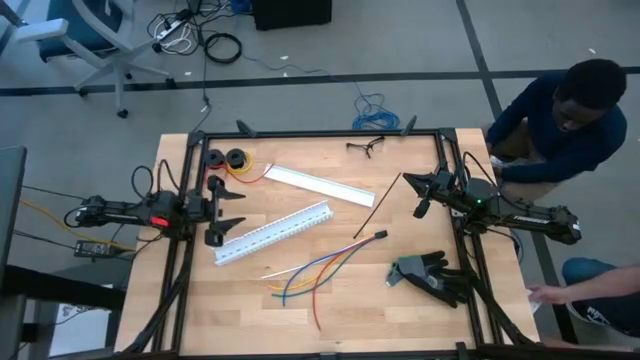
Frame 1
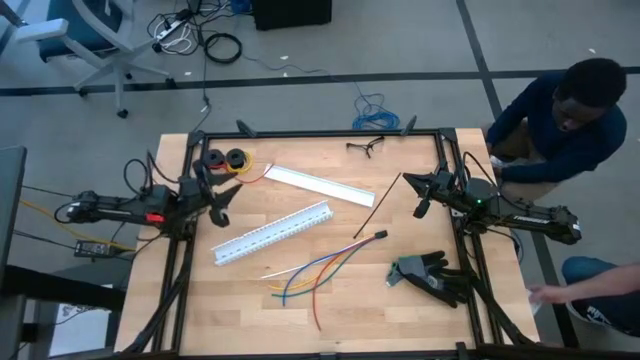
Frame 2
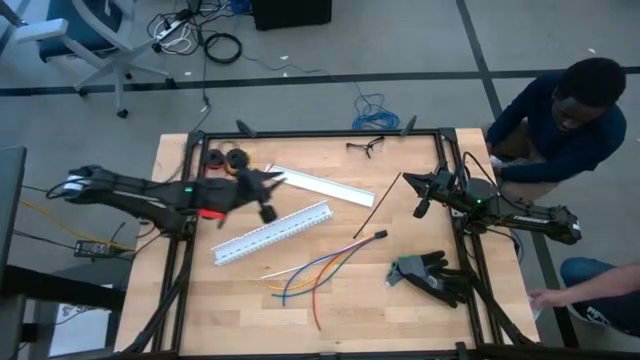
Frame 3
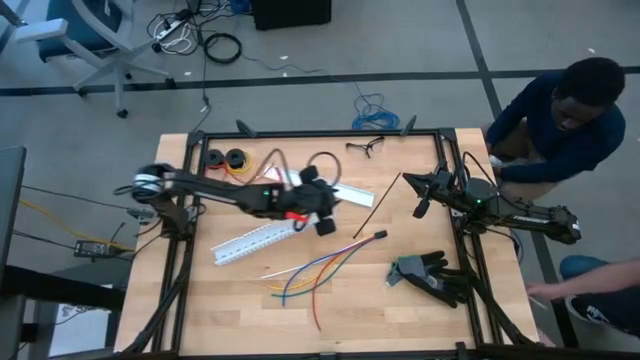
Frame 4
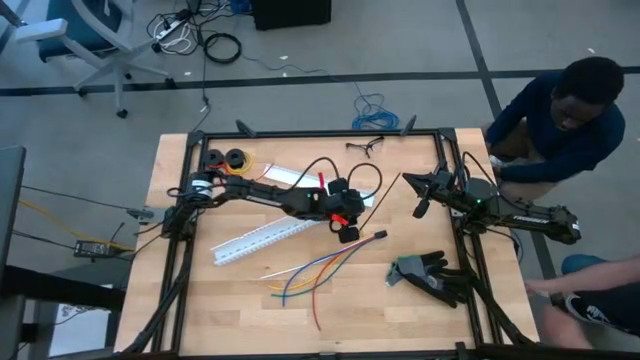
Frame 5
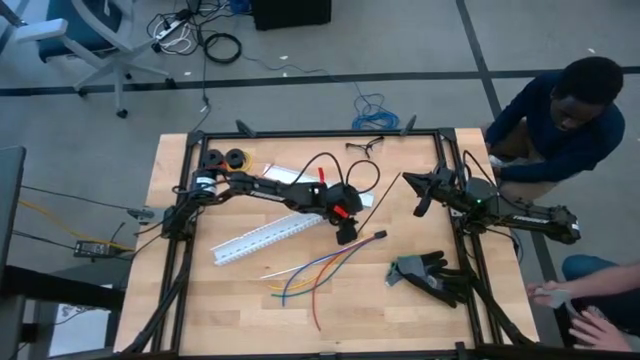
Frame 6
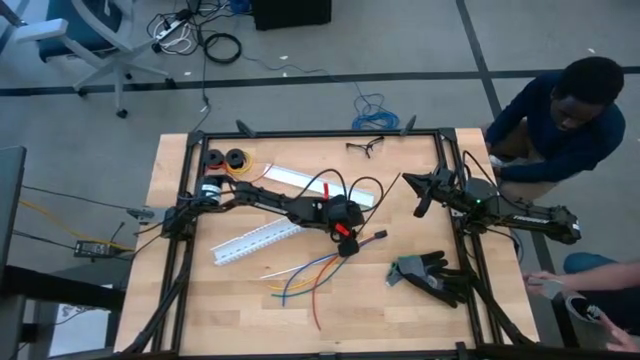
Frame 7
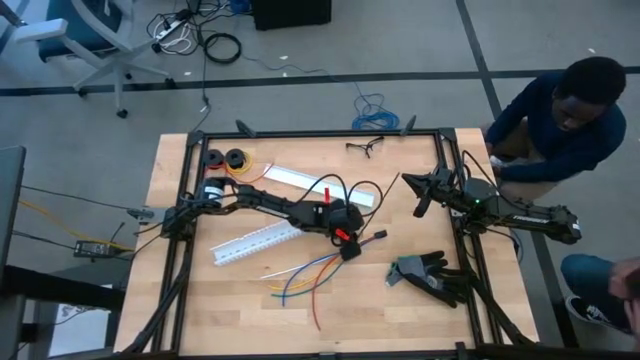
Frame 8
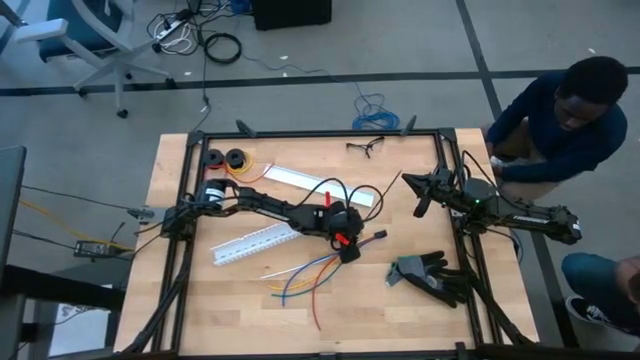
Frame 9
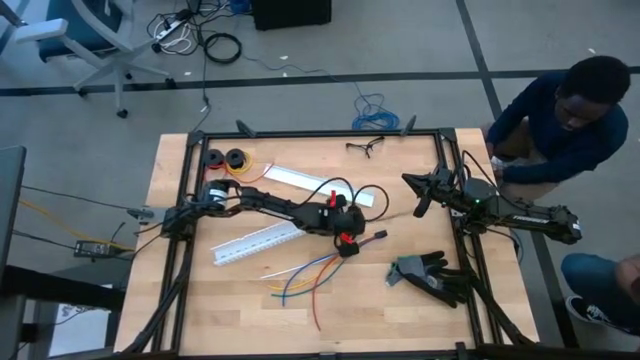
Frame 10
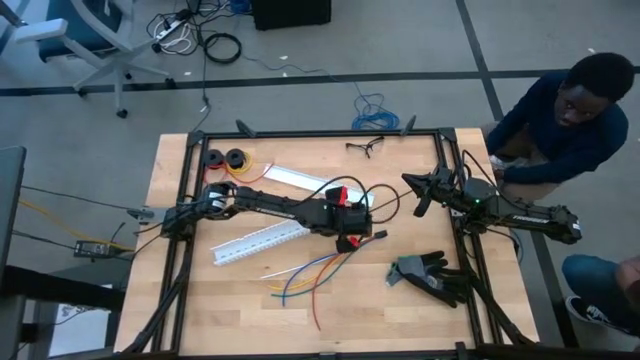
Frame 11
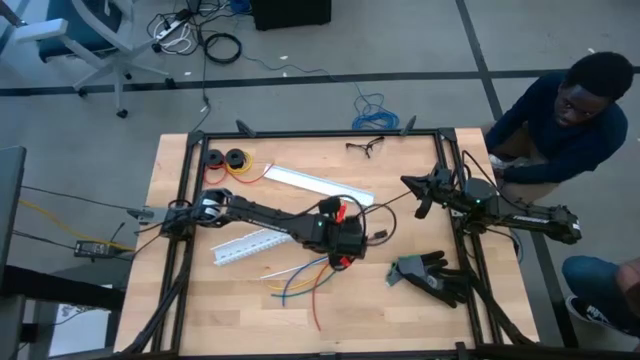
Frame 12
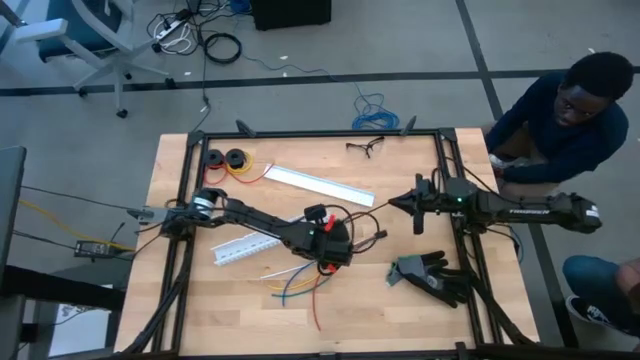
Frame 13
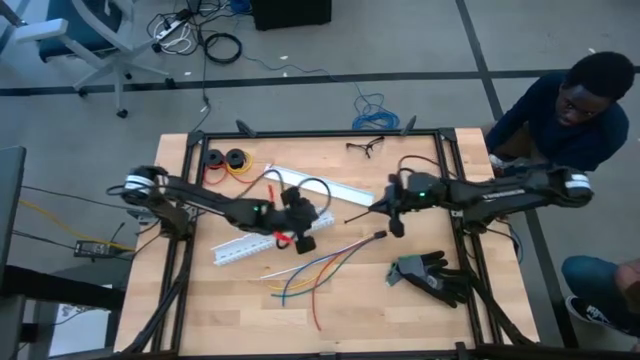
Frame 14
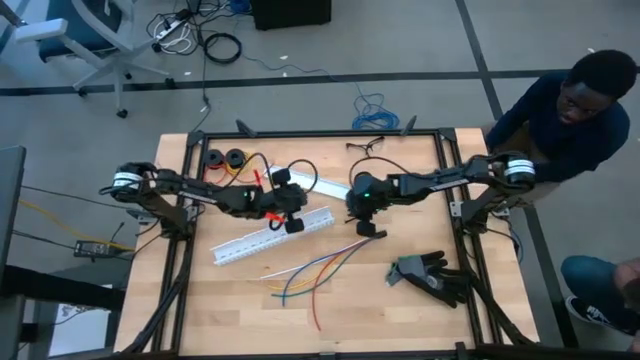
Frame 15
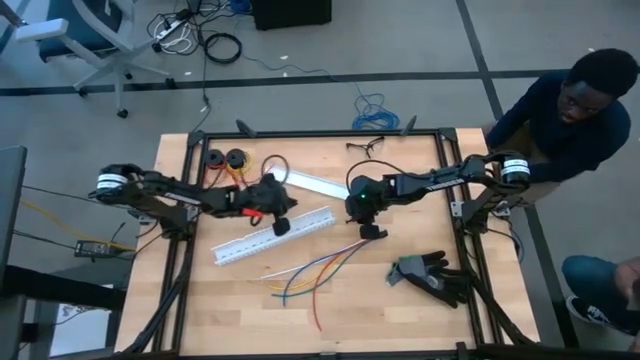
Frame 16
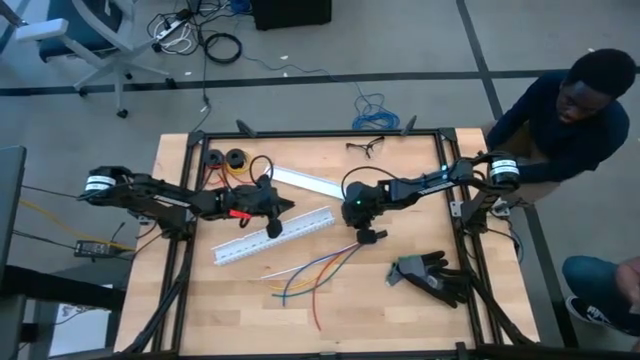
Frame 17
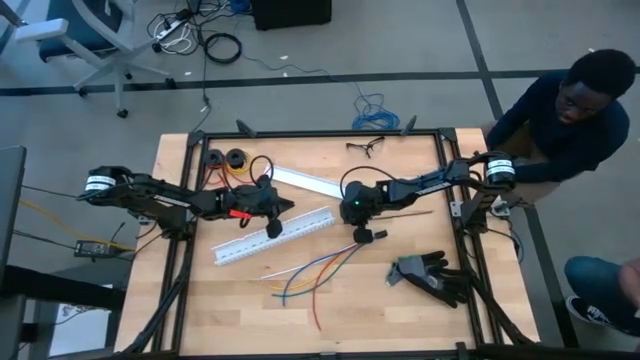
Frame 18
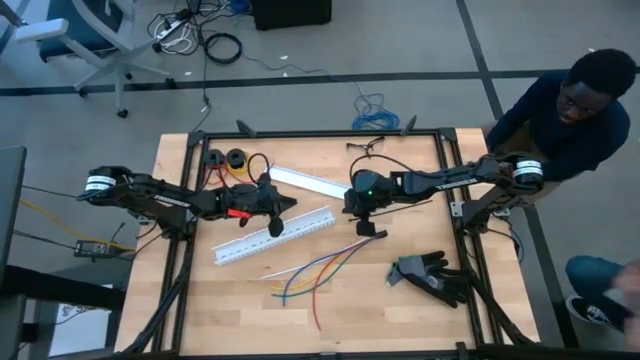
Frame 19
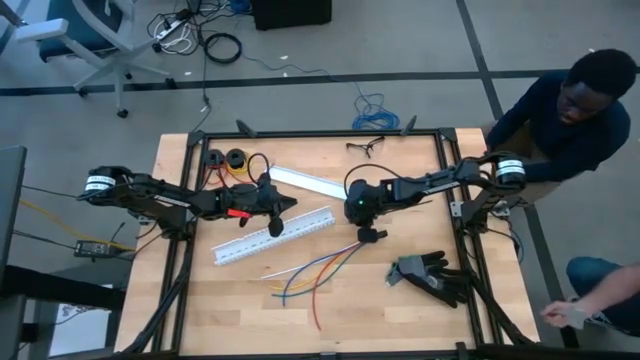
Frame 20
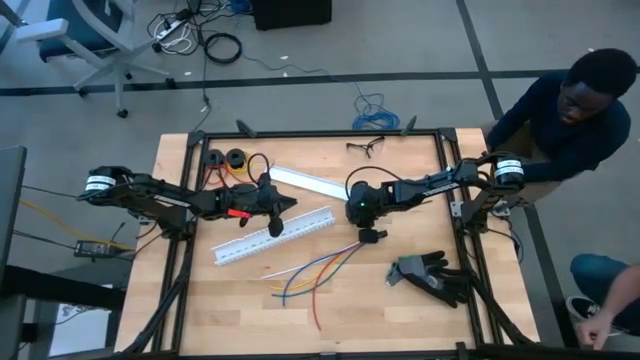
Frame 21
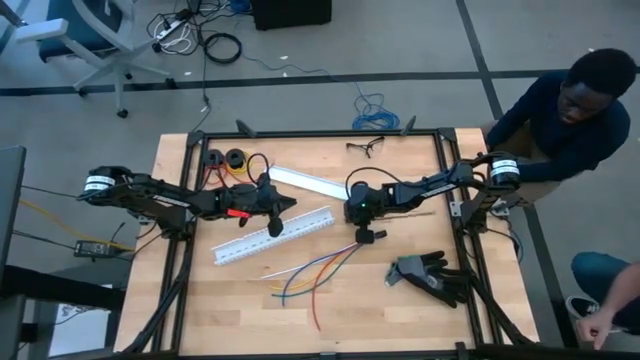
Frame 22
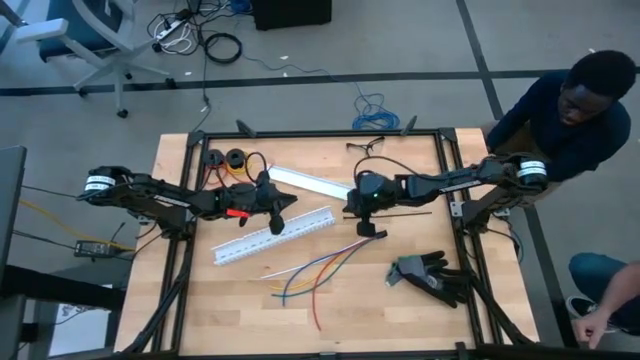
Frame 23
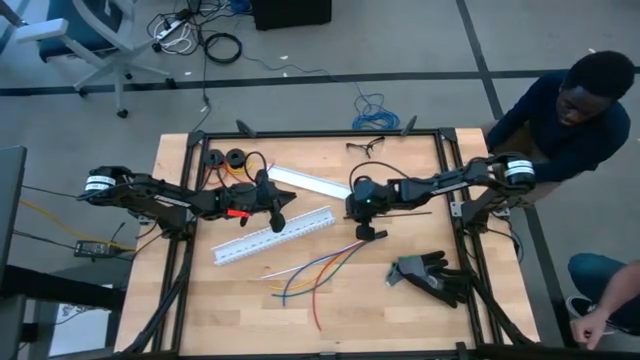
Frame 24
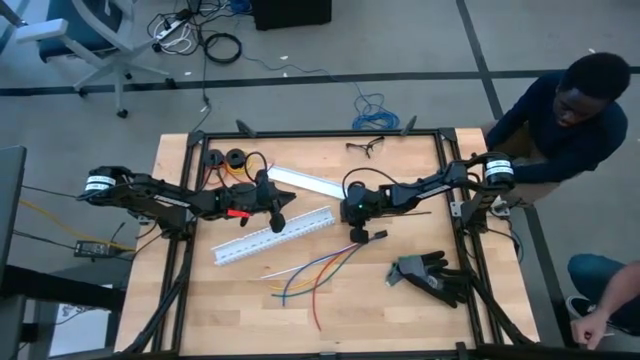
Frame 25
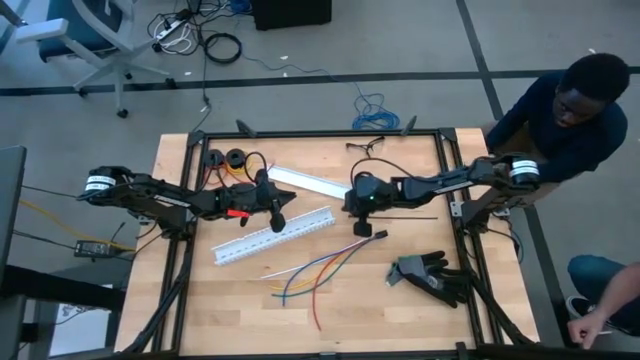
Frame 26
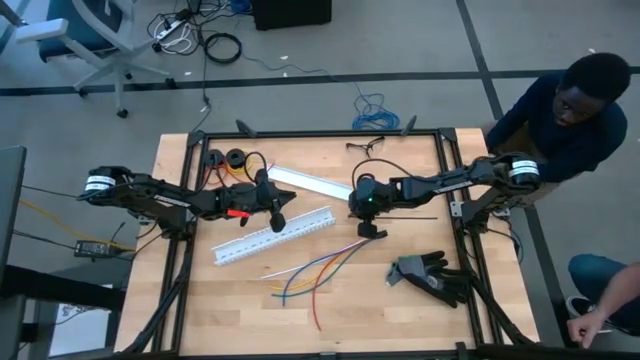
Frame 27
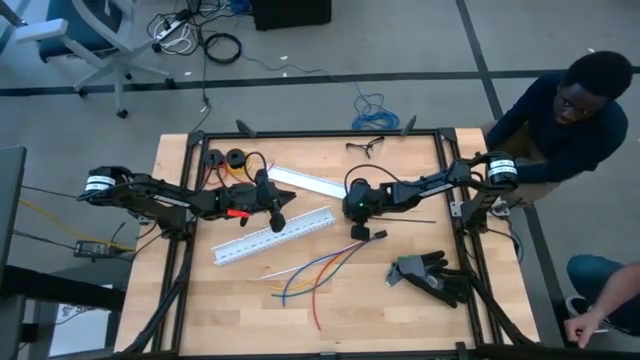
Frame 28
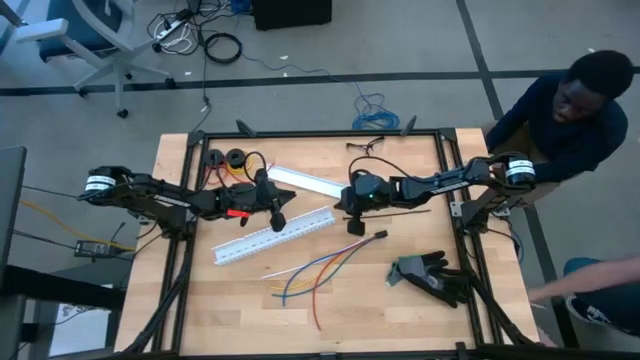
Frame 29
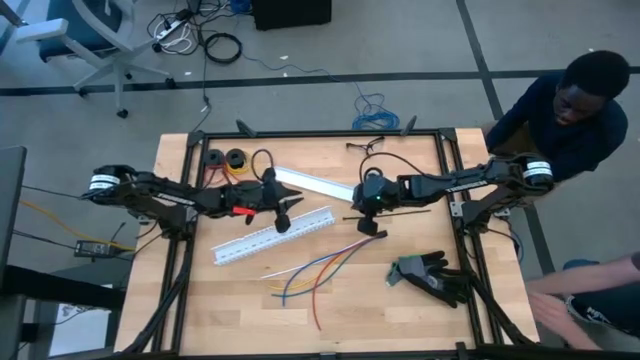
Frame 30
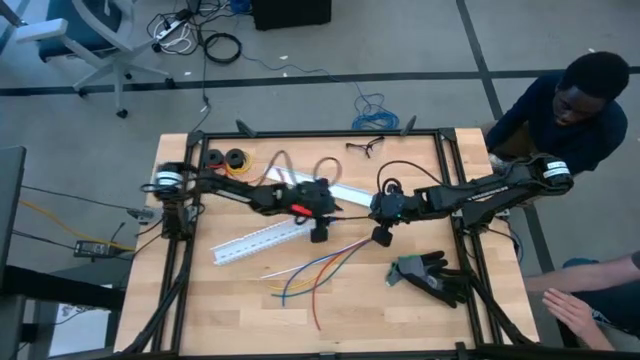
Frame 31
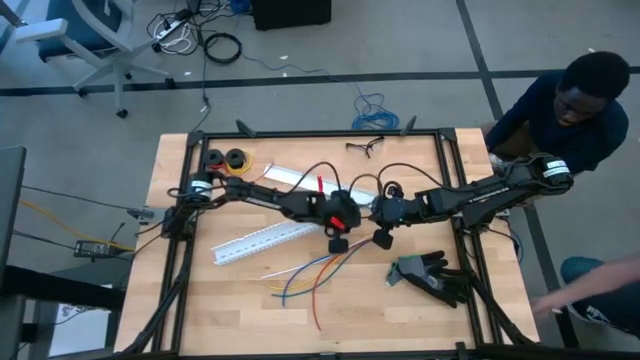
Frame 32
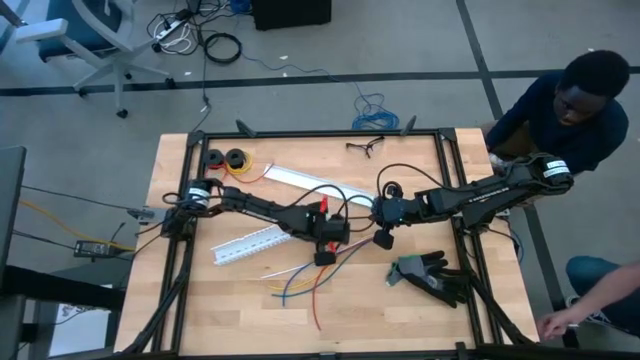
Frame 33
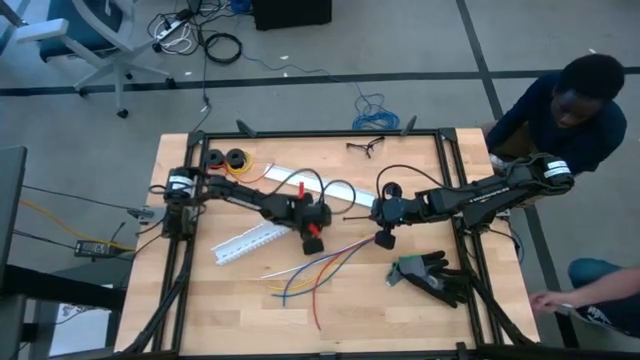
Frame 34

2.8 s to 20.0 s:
Task: Ziptie cables
Wrap the black zip tie on the cables

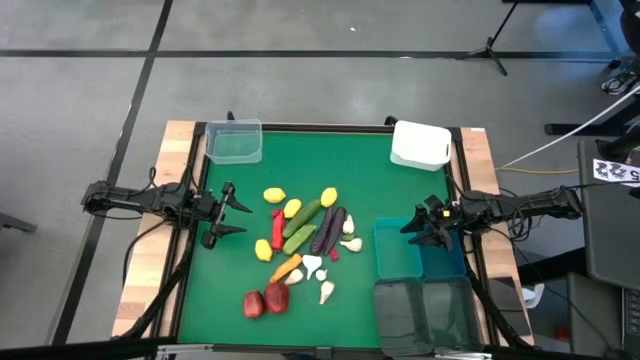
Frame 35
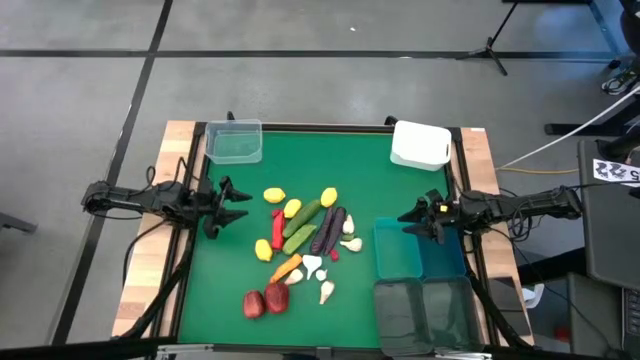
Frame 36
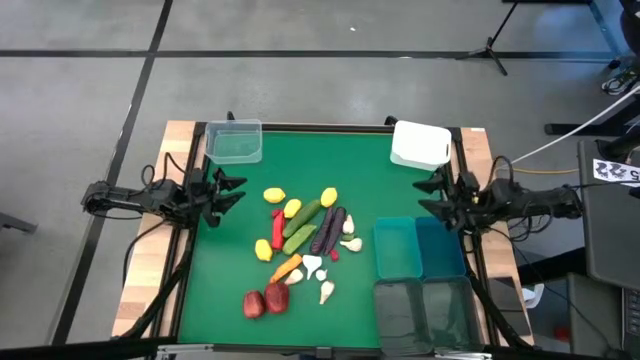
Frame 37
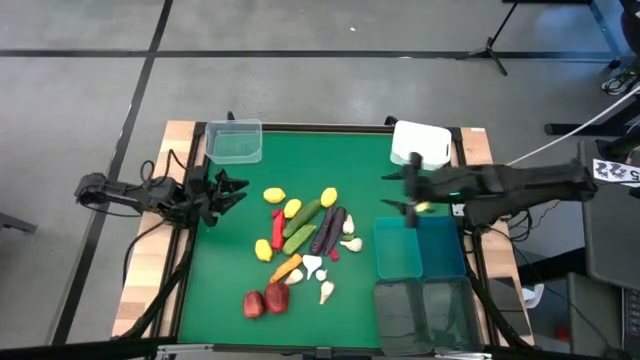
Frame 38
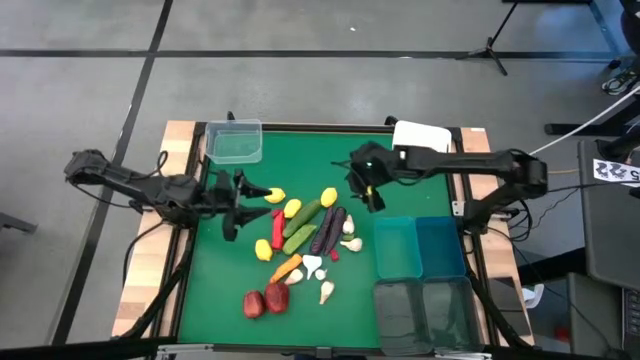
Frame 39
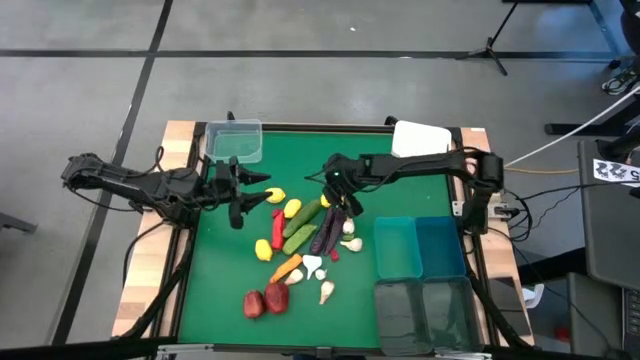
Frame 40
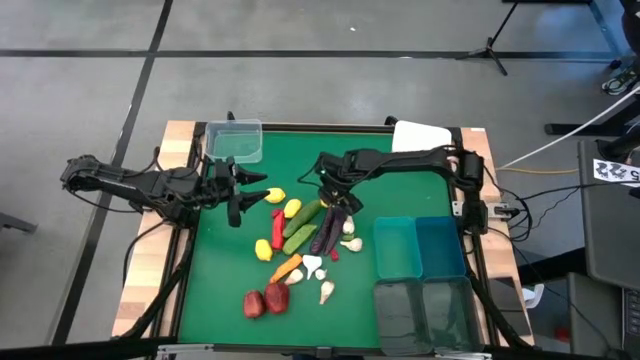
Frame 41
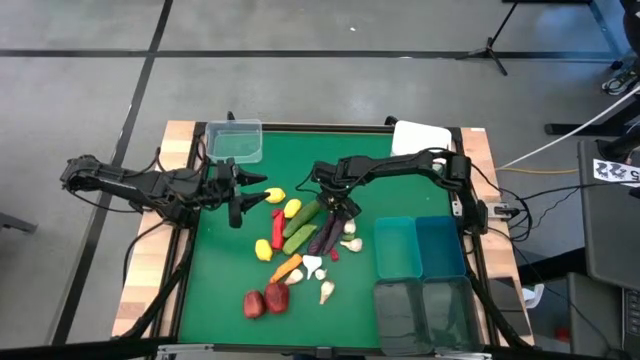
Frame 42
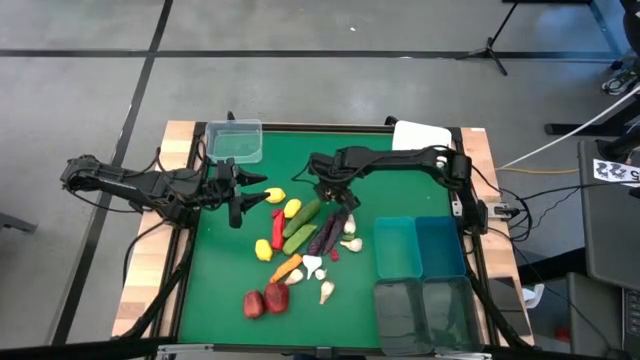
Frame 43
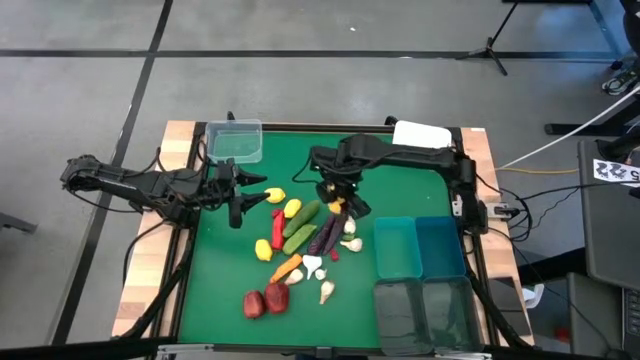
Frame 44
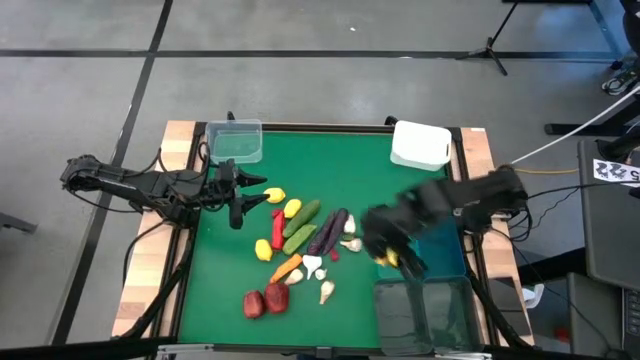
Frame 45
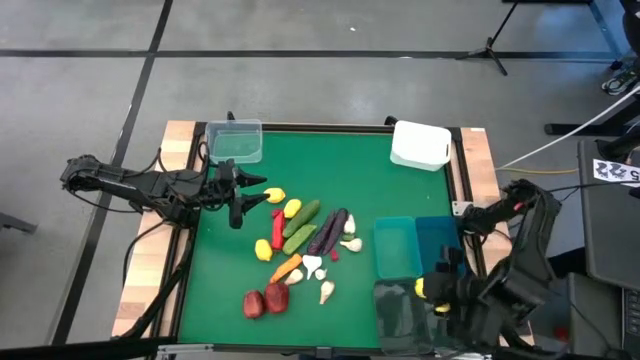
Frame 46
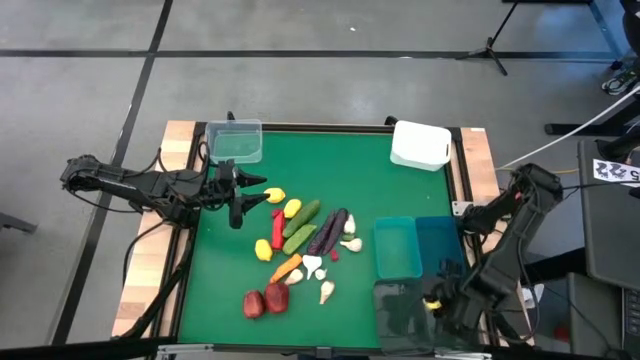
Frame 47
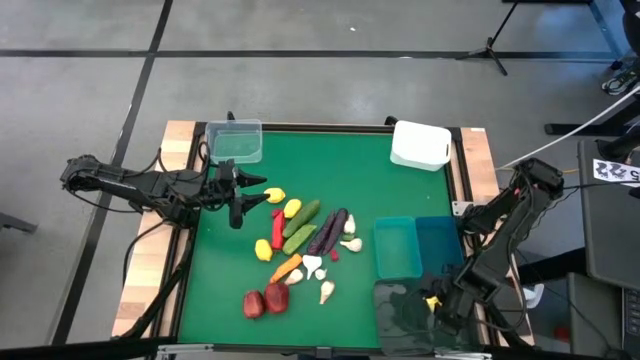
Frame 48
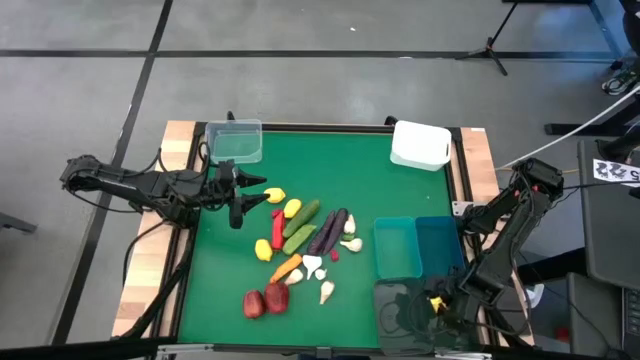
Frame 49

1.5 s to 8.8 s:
Task: Sort produce into baskets
Put the lemon into the right black bin
